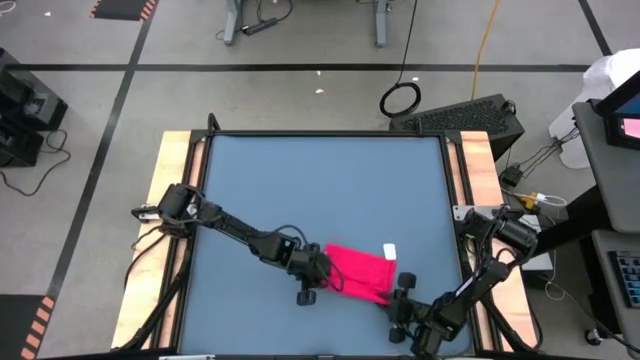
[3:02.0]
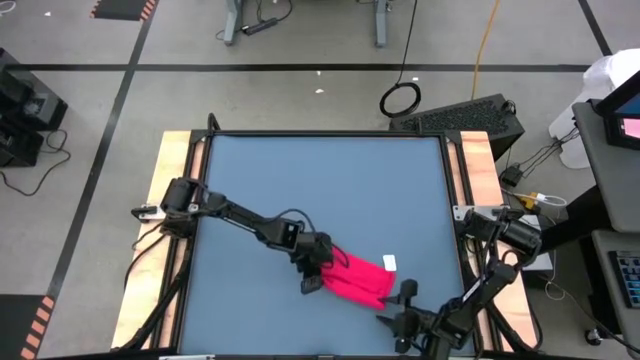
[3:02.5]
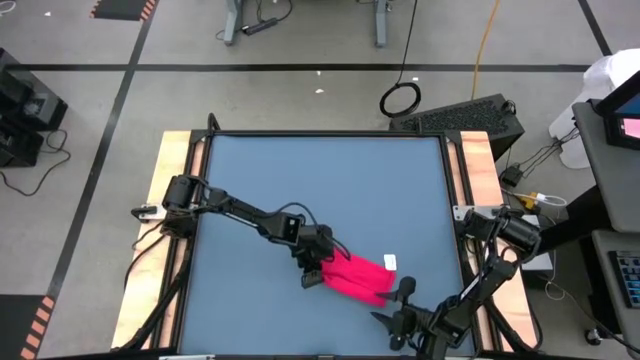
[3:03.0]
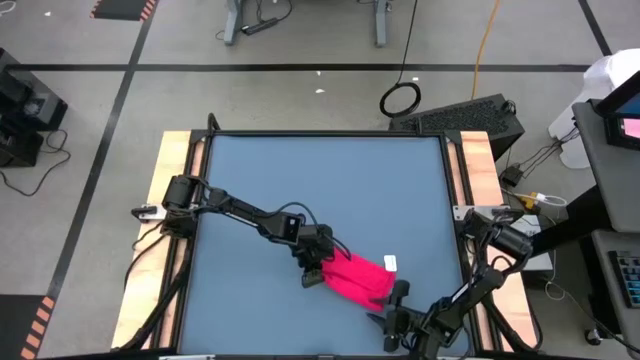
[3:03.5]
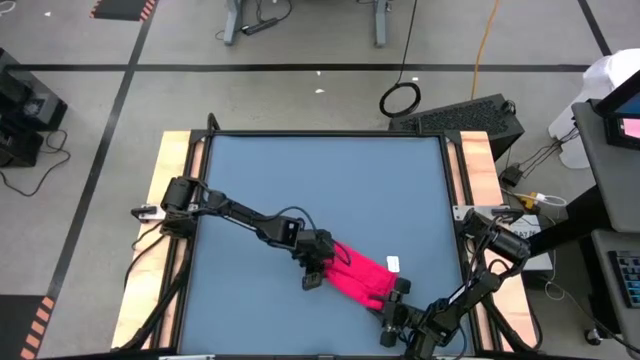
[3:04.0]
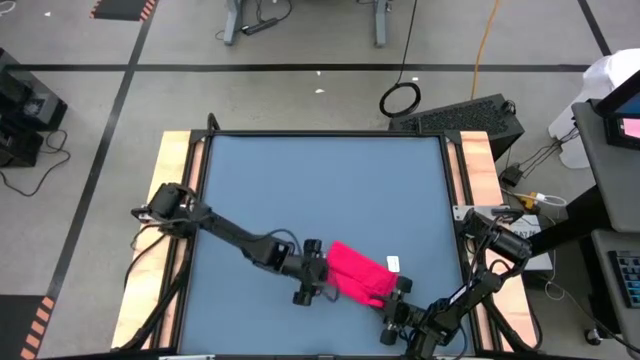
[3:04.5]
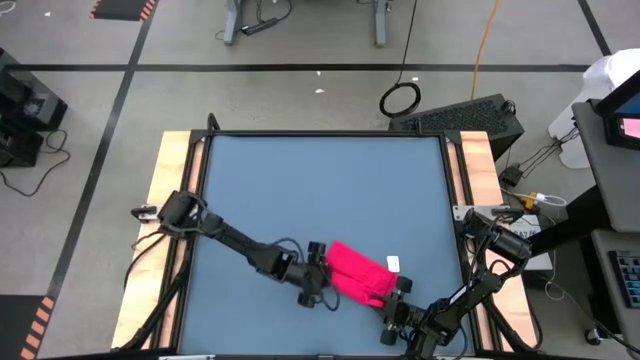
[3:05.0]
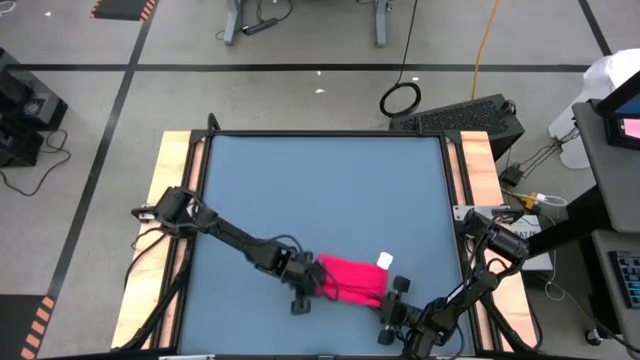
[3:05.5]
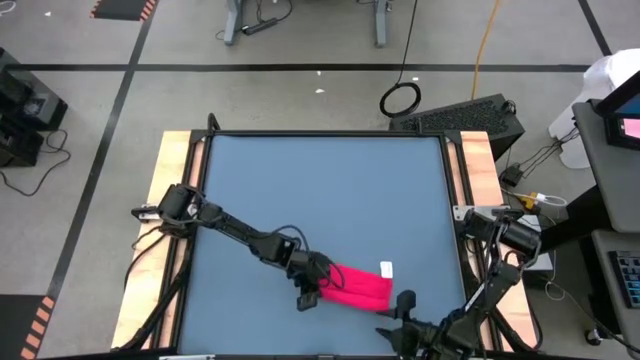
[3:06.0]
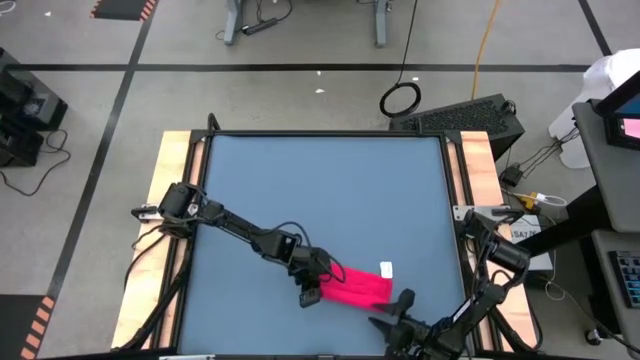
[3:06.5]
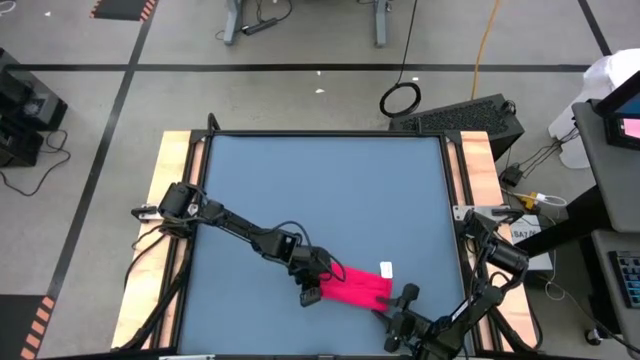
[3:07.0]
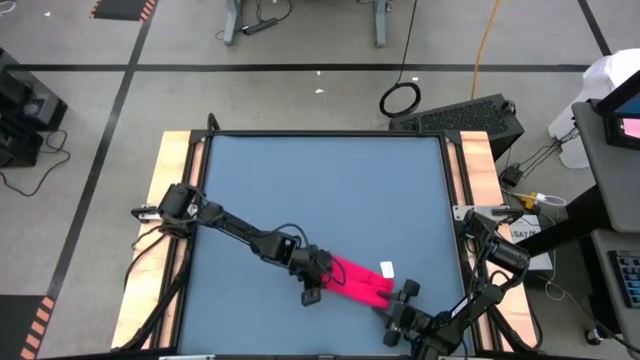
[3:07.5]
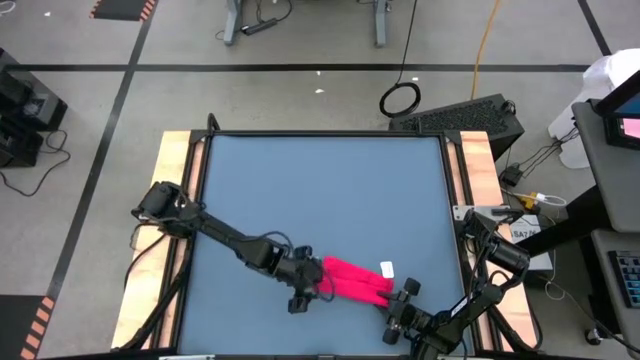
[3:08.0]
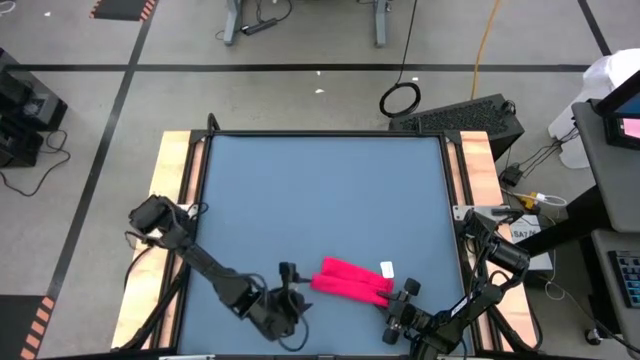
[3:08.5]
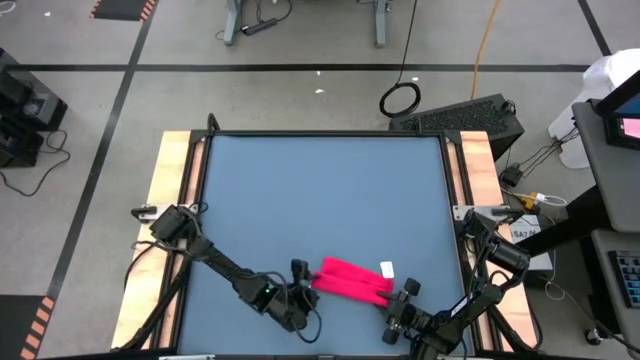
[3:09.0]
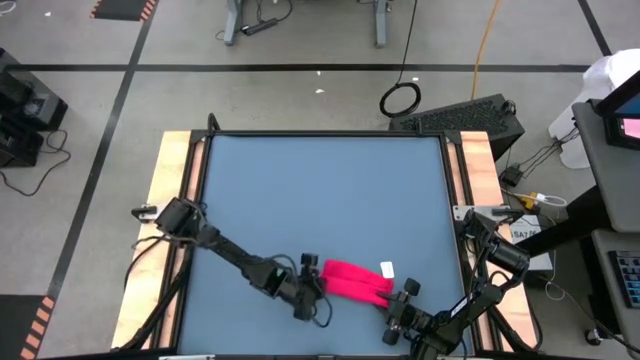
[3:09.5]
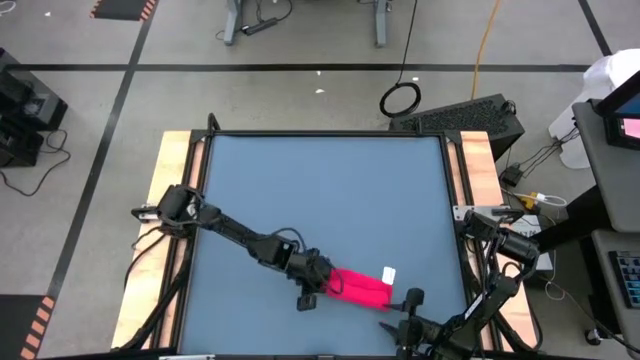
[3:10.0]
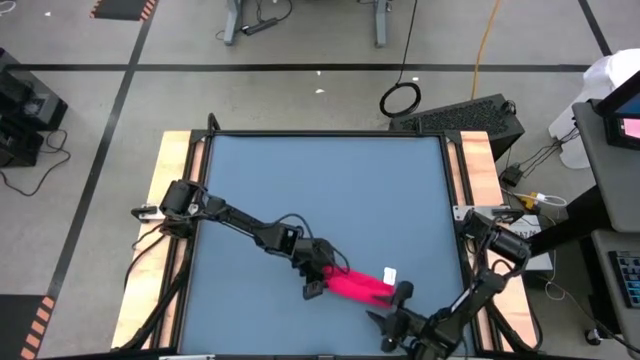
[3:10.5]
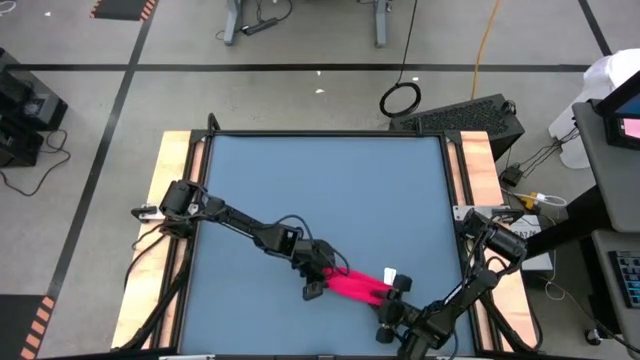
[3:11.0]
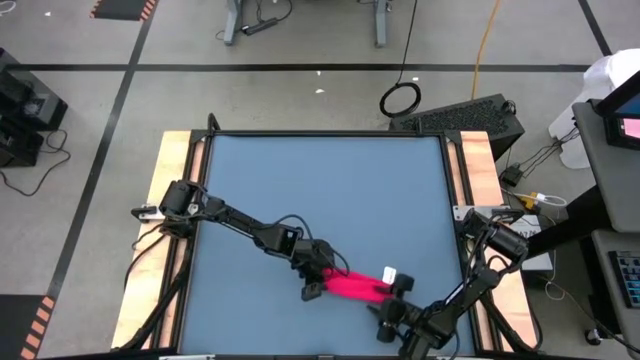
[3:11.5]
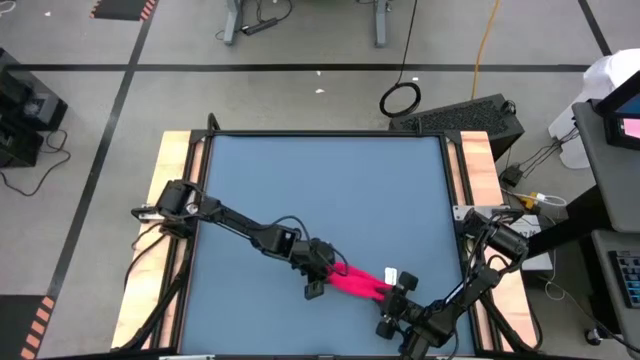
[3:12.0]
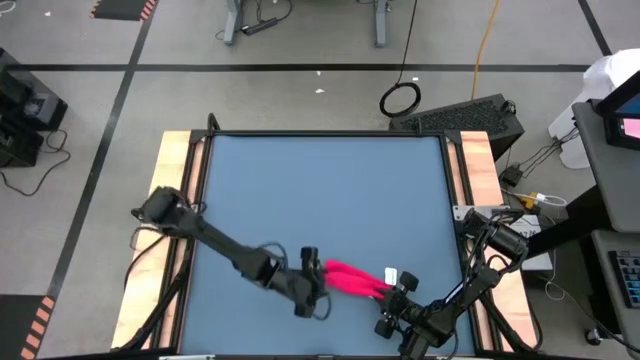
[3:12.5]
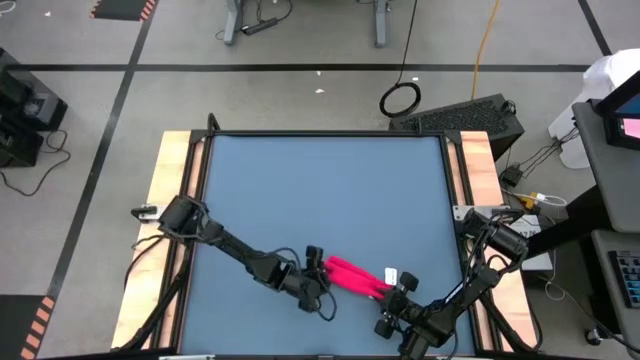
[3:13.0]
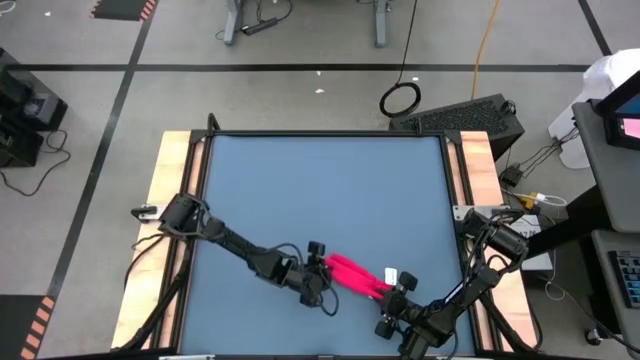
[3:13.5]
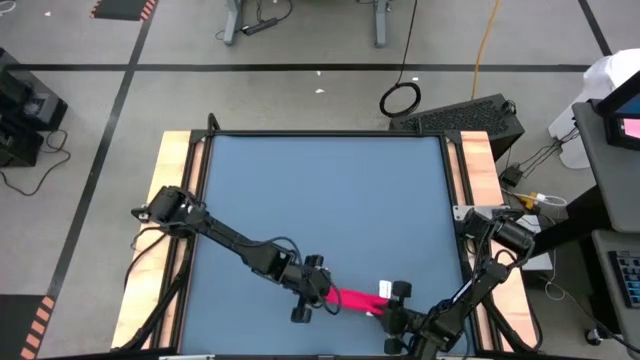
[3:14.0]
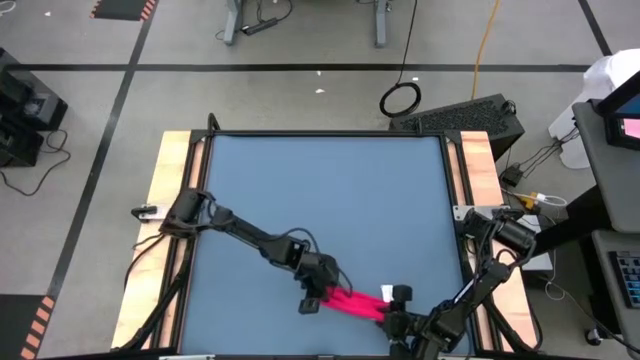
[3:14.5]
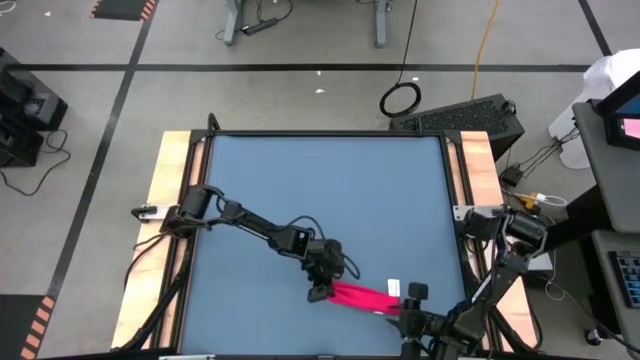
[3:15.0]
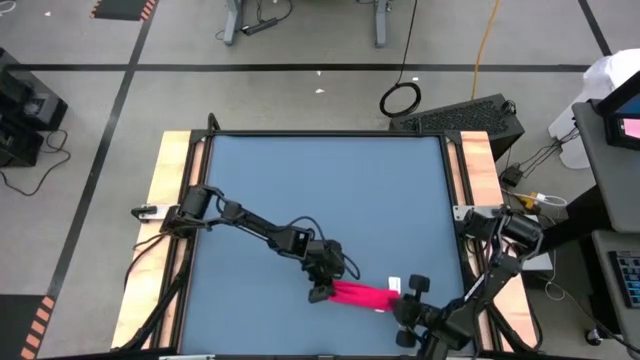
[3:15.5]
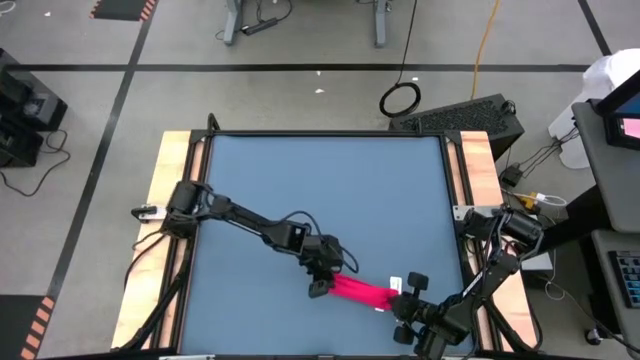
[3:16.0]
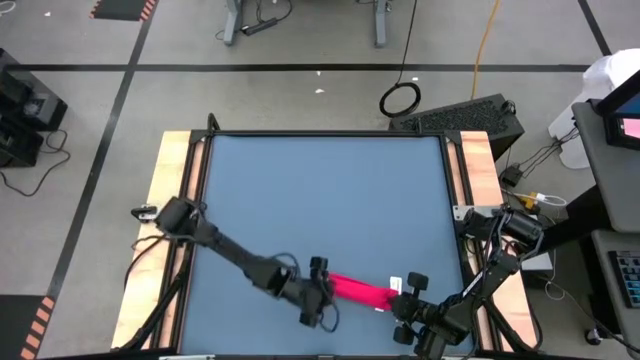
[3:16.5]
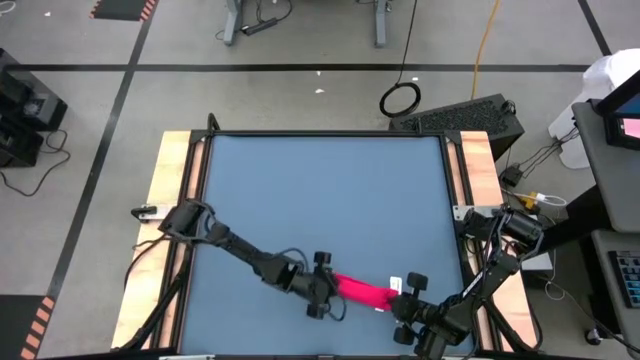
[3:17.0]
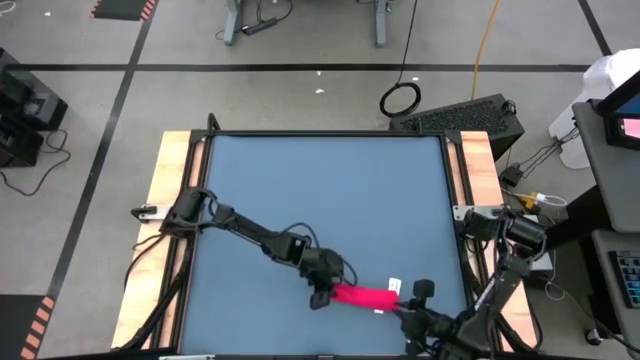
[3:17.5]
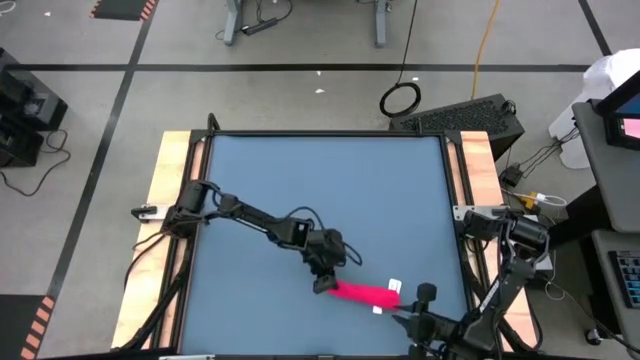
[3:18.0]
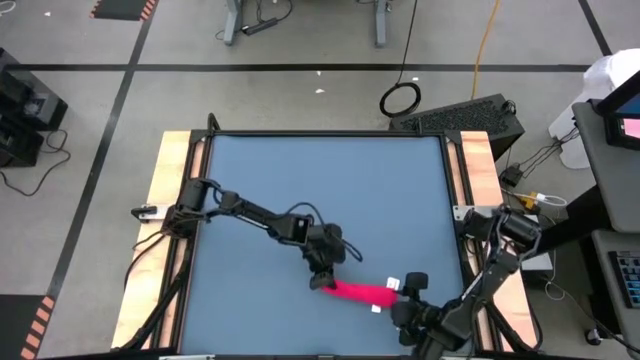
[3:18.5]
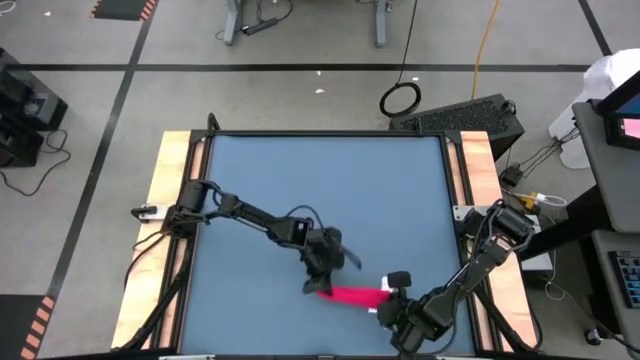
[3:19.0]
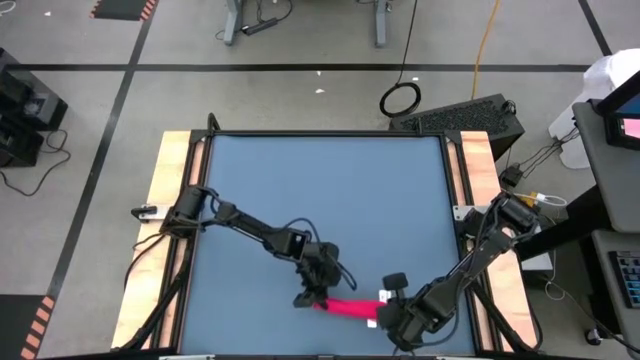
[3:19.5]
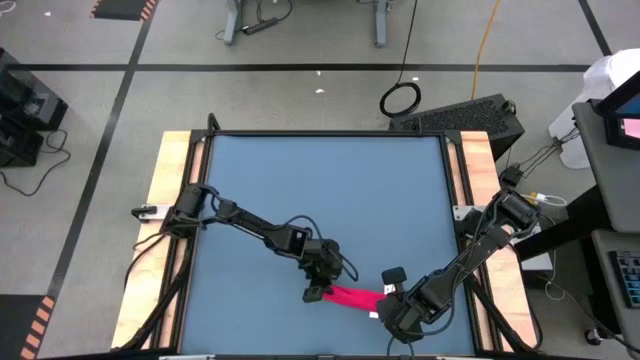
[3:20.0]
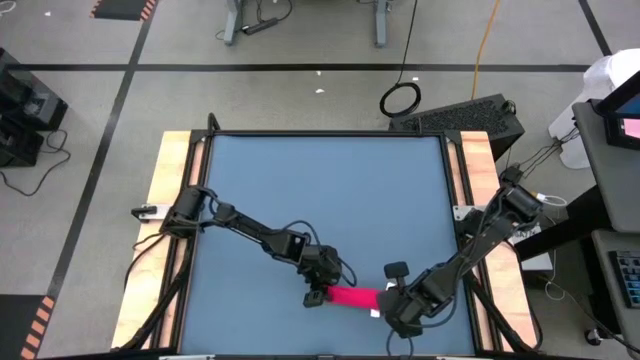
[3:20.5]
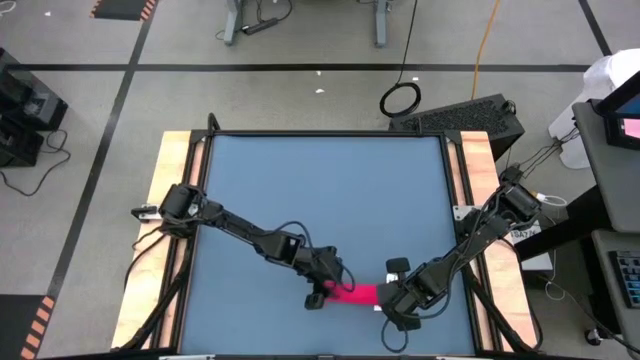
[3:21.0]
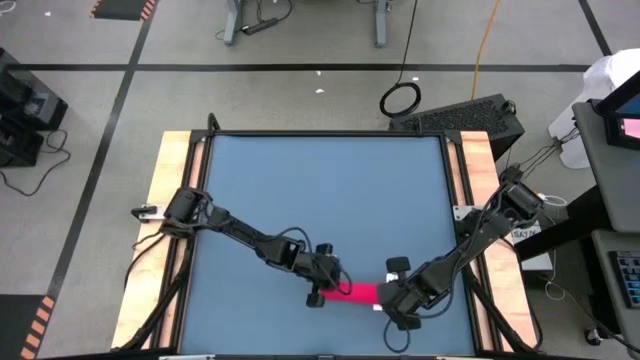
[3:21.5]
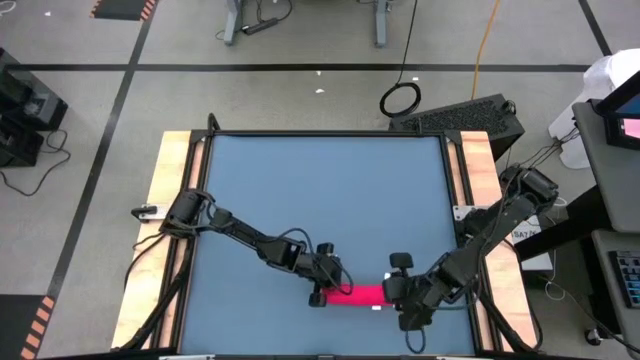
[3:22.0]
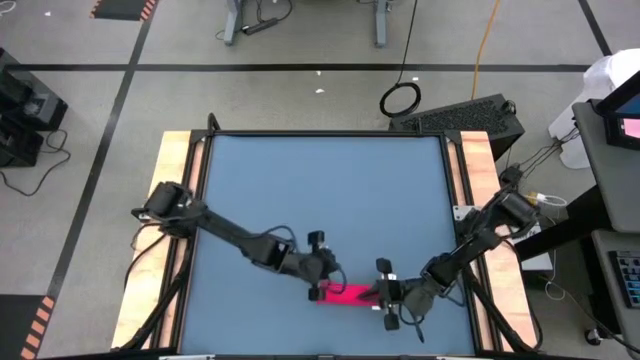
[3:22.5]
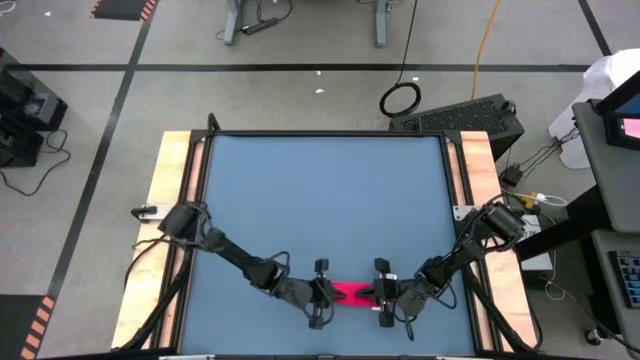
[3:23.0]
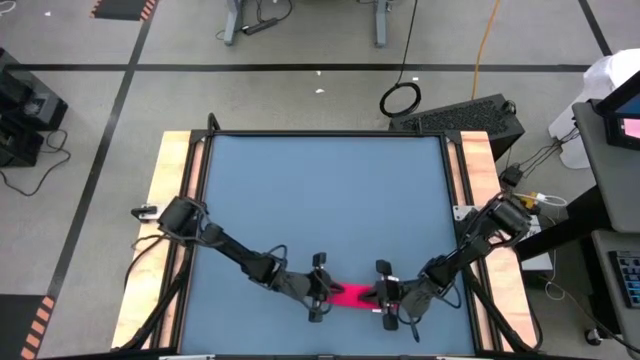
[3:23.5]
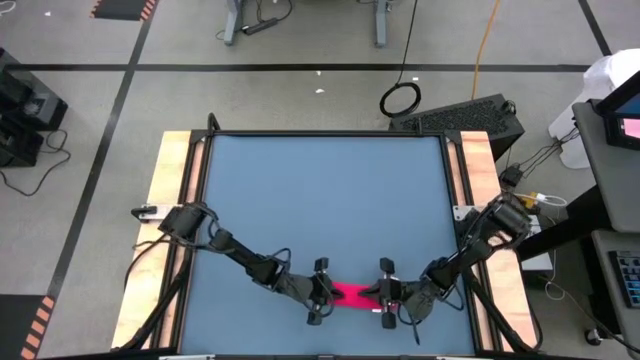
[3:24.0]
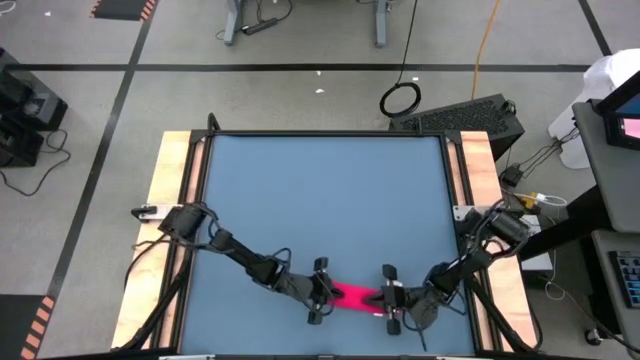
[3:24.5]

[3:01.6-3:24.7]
Task: Roll towel
Roll the red towel
